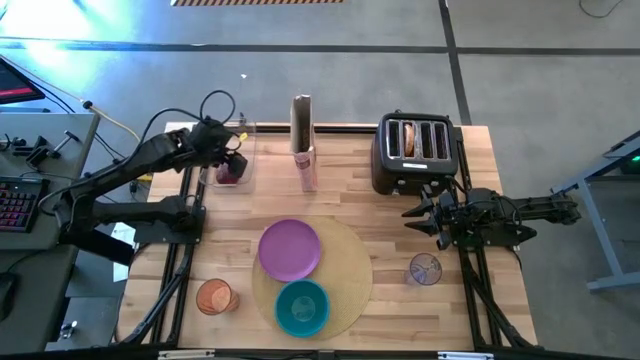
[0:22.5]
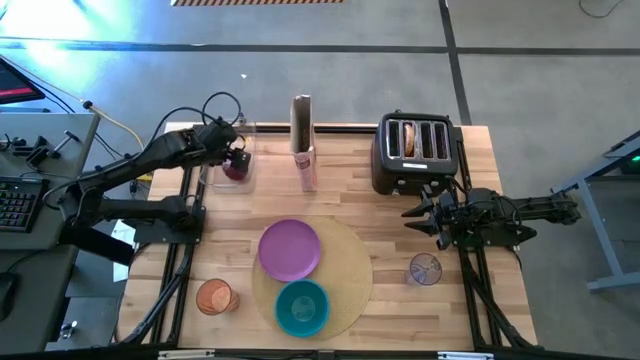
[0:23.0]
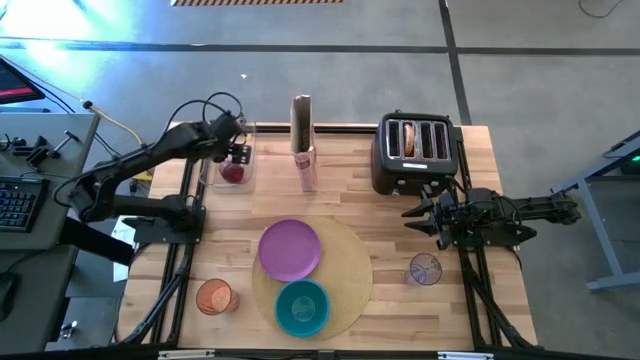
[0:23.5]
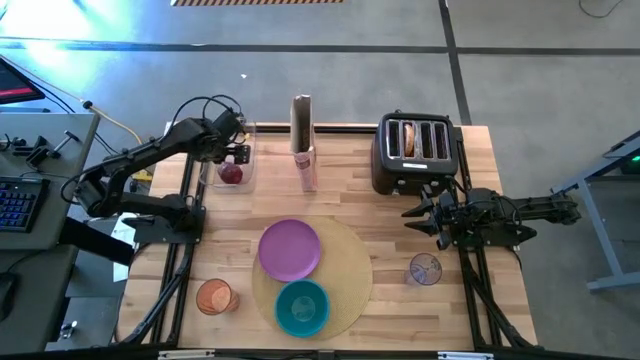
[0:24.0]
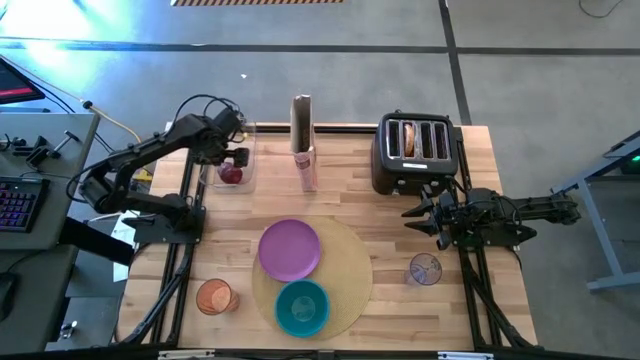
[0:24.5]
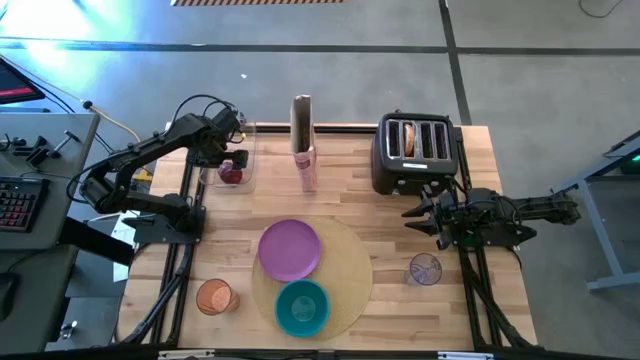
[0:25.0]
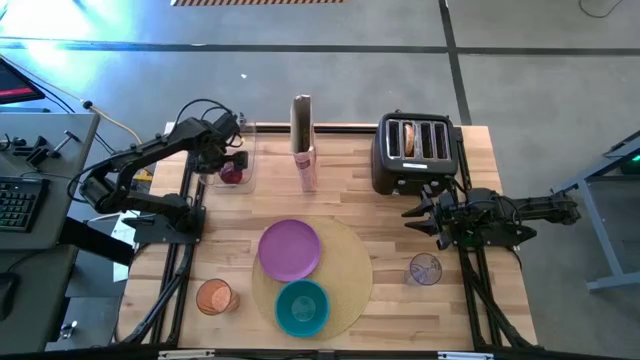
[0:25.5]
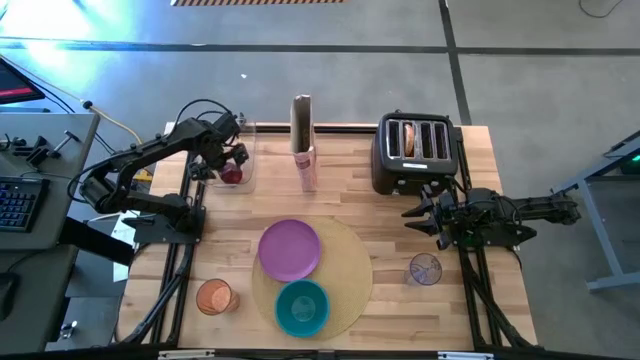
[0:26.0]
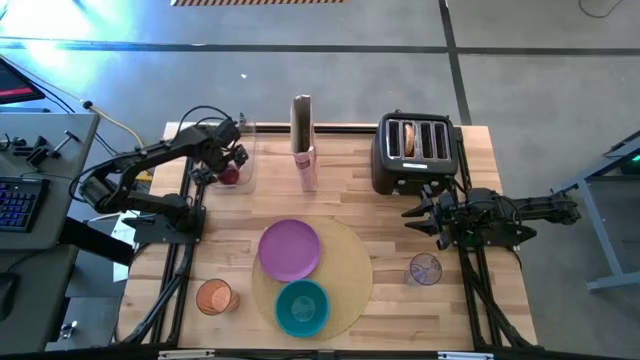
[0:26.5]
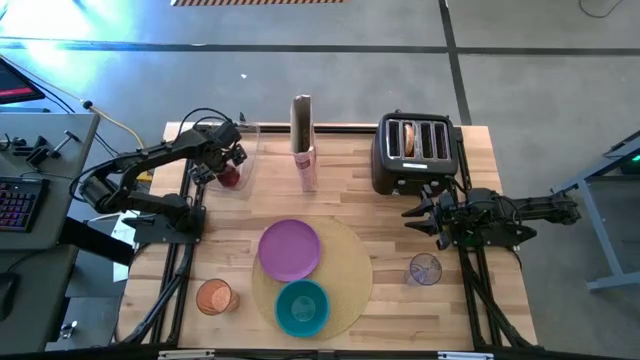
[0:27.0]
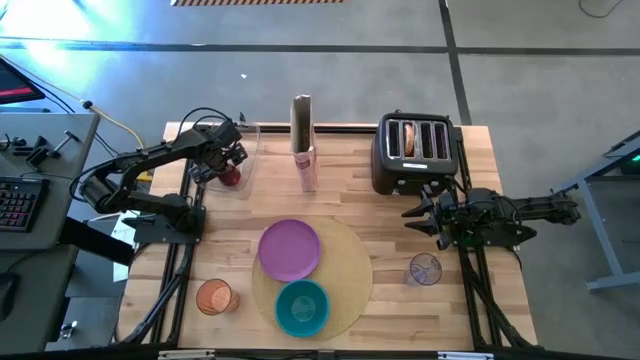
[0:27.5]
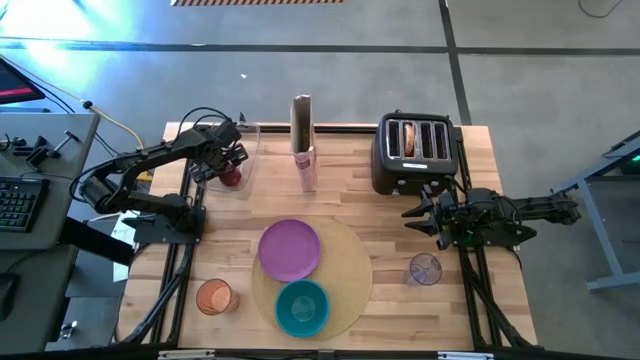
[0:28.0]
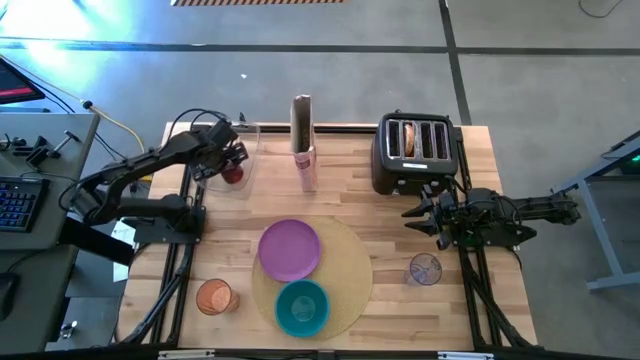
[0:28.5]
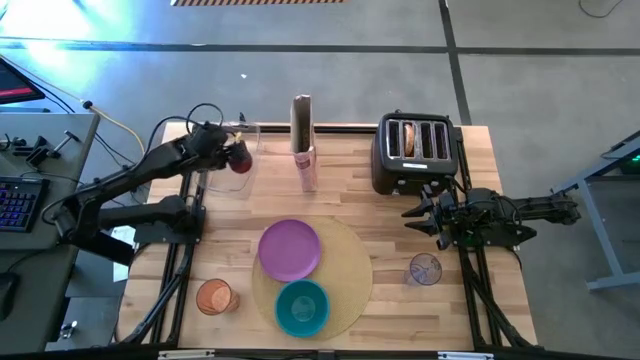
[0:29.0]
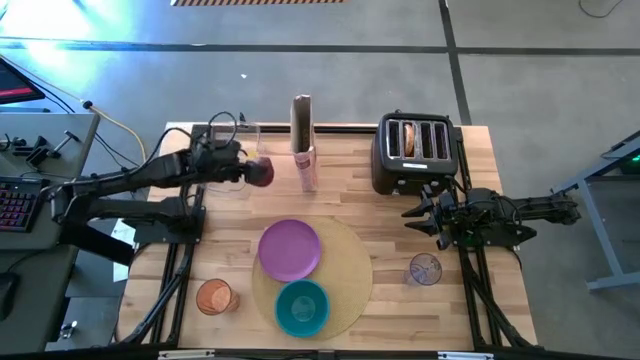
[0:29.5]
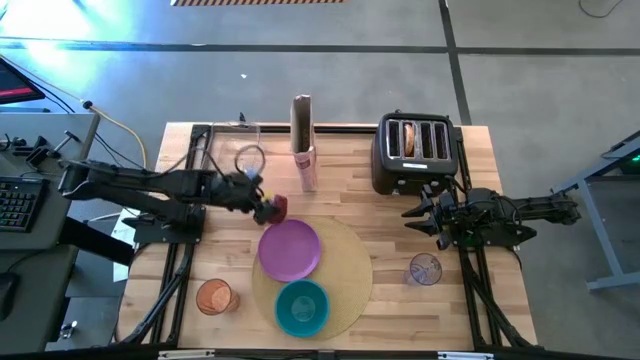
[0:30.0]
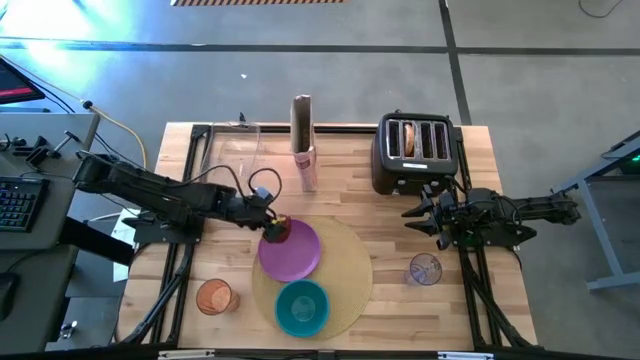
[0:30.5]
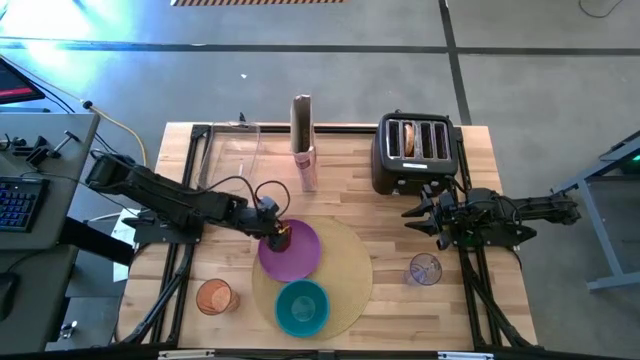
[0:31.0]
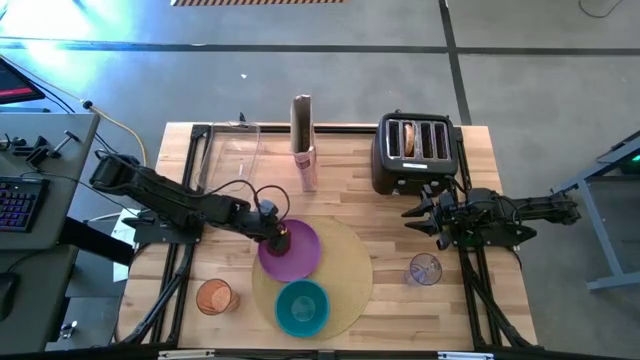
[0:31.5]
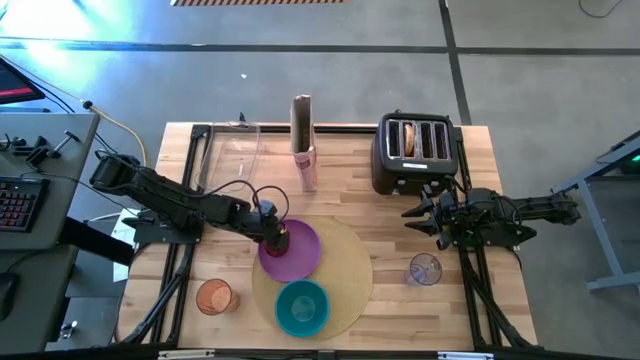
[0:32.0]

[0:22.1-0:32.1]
Task: Arrange a breakfast setting
Put the red apple on the purple plate

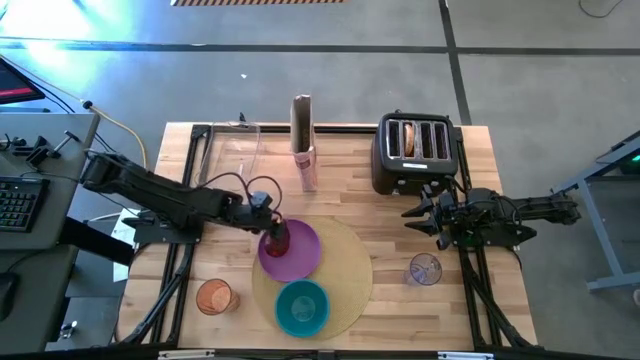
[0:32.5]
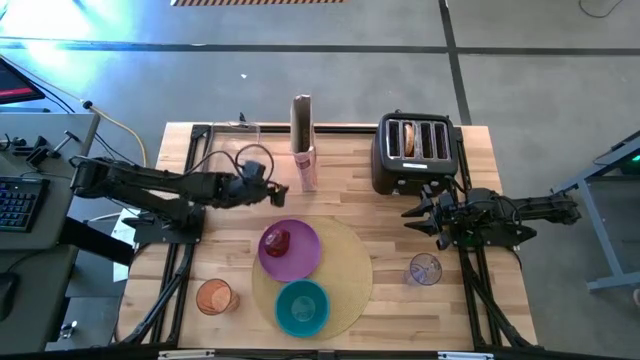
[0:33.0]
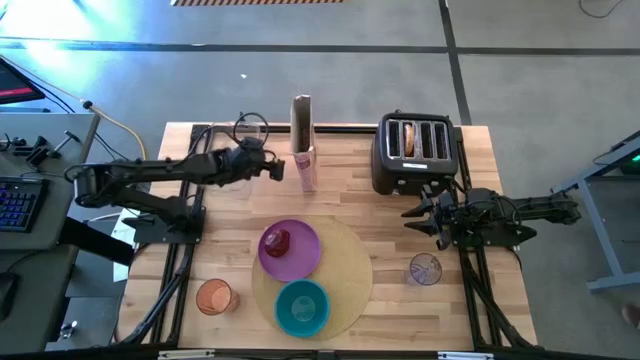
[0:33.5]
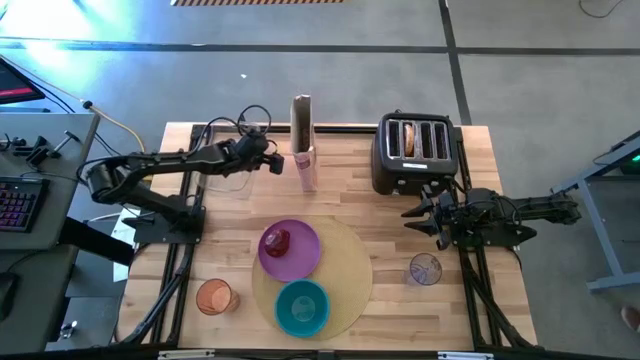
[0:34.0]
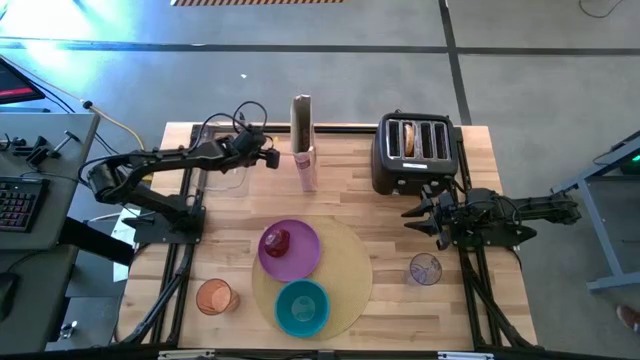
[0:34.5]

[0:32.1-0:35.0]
Adjust the transparent bin on the table

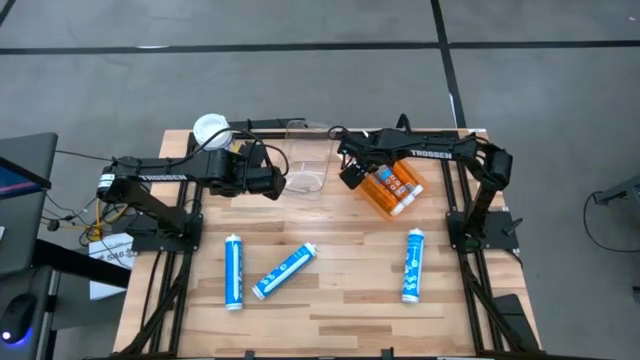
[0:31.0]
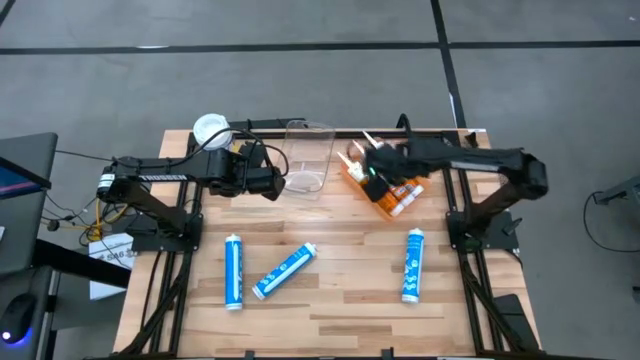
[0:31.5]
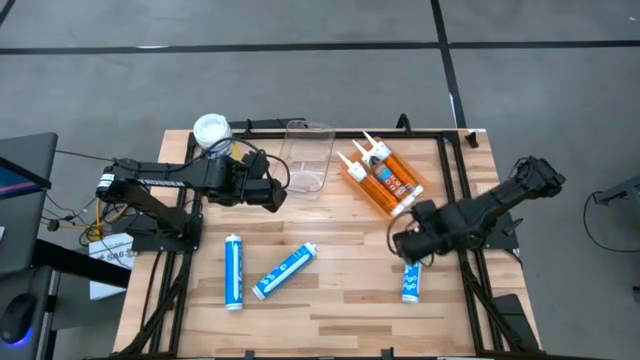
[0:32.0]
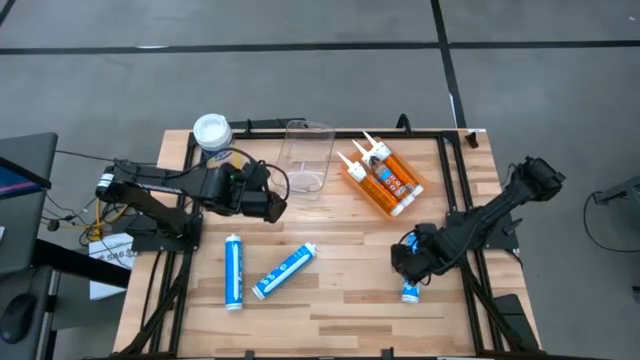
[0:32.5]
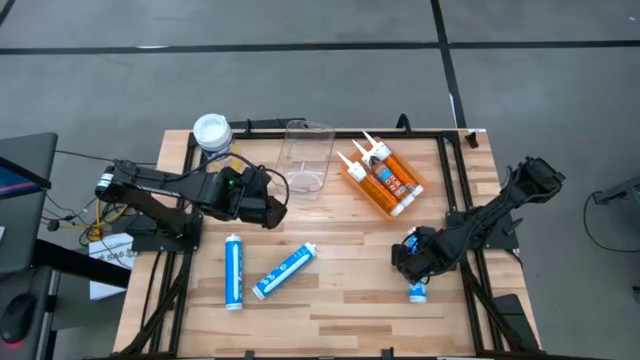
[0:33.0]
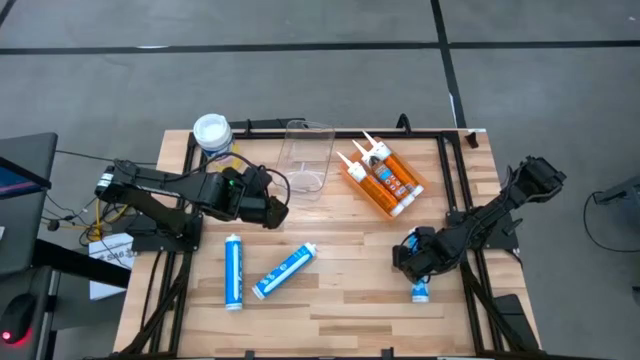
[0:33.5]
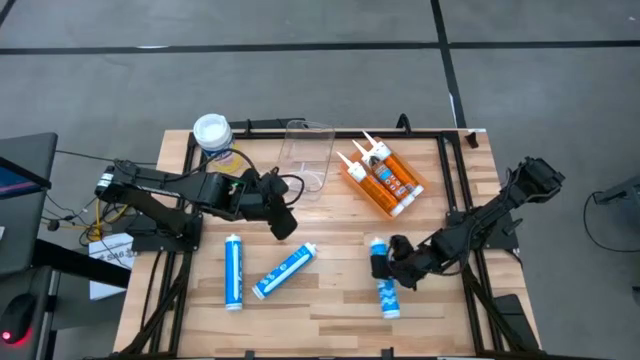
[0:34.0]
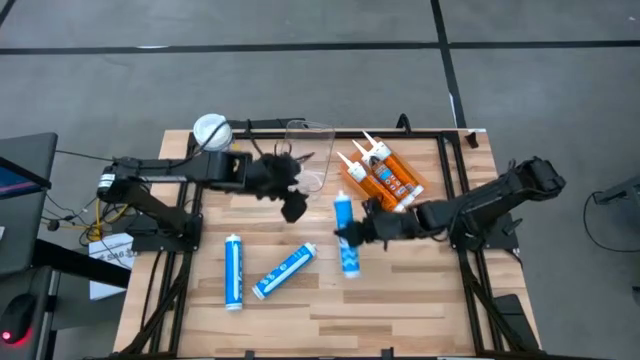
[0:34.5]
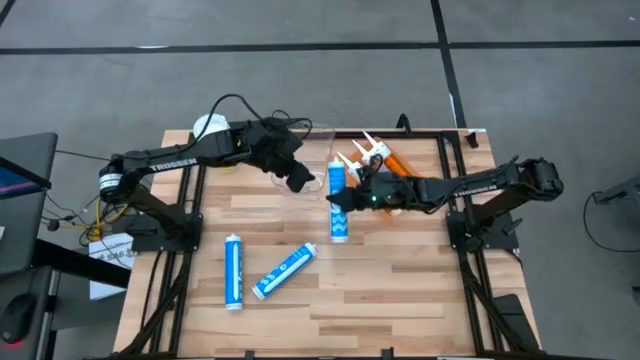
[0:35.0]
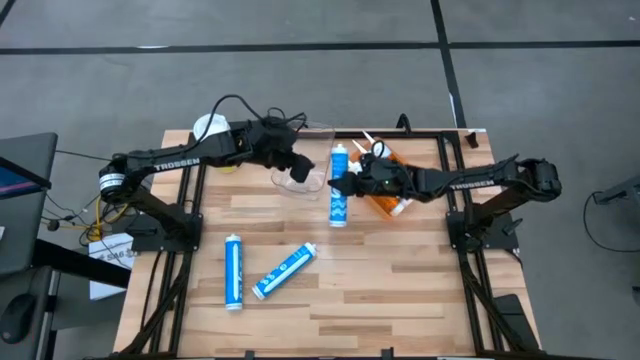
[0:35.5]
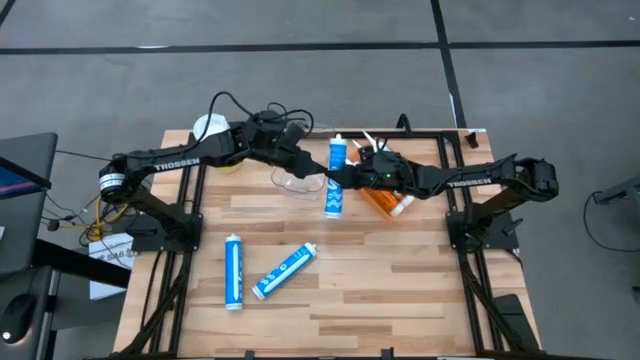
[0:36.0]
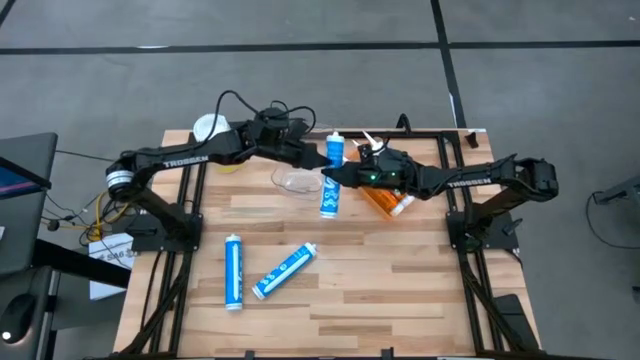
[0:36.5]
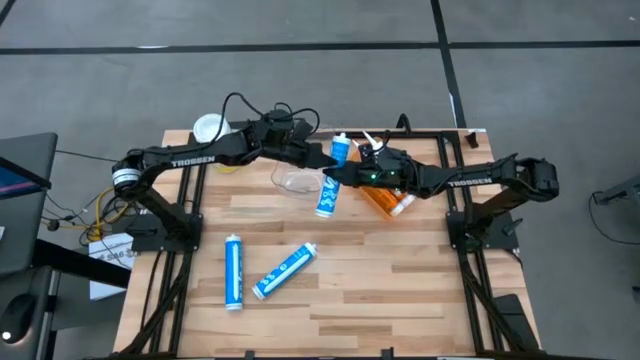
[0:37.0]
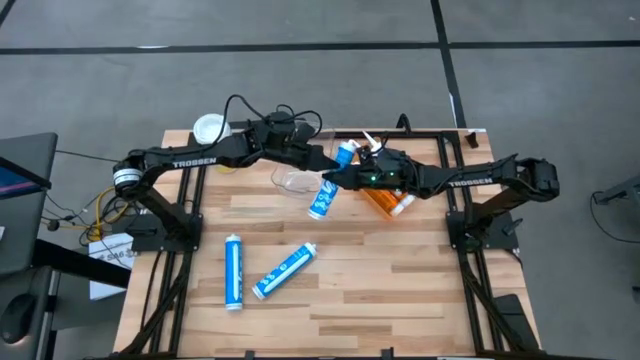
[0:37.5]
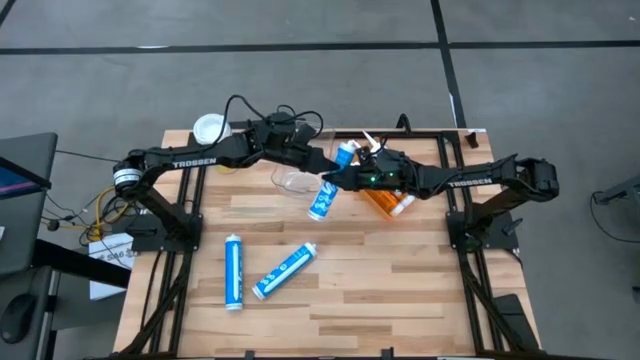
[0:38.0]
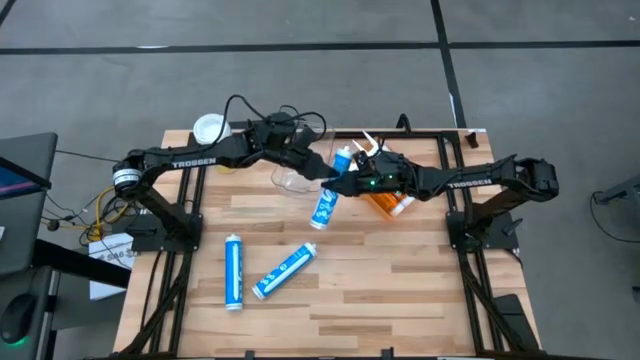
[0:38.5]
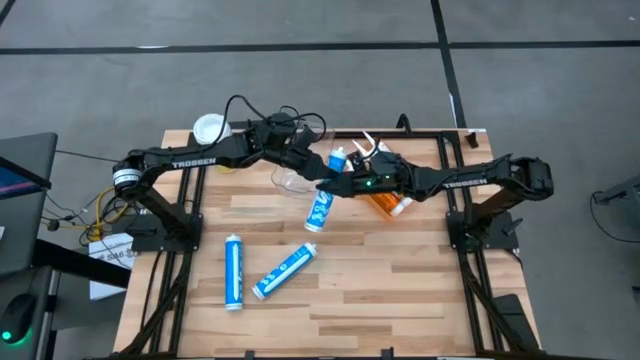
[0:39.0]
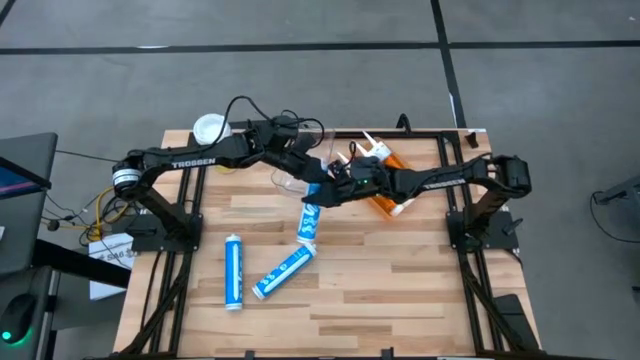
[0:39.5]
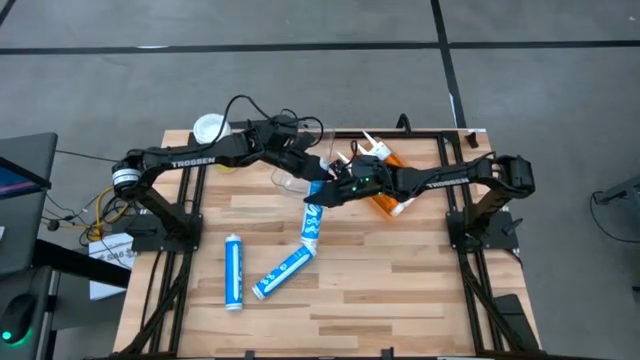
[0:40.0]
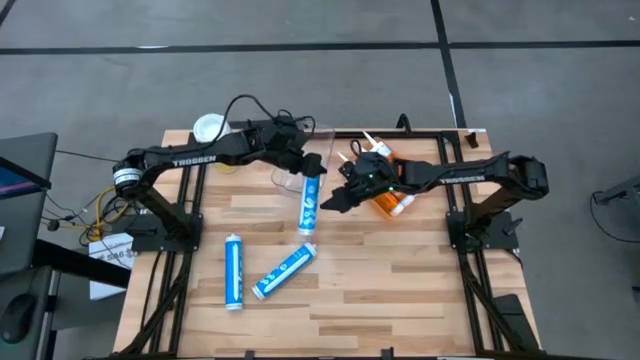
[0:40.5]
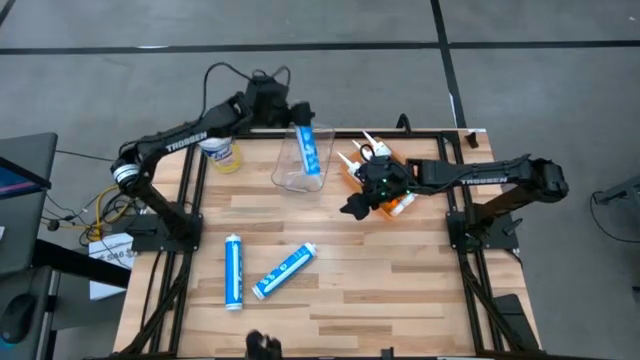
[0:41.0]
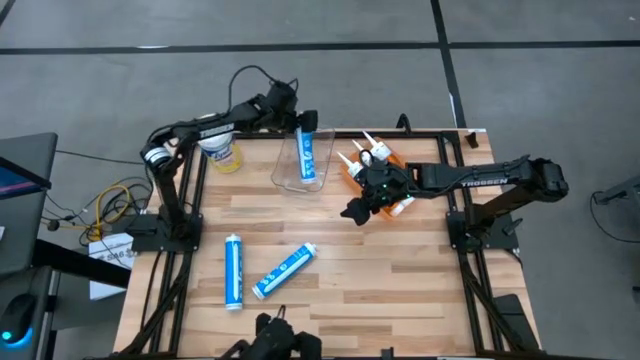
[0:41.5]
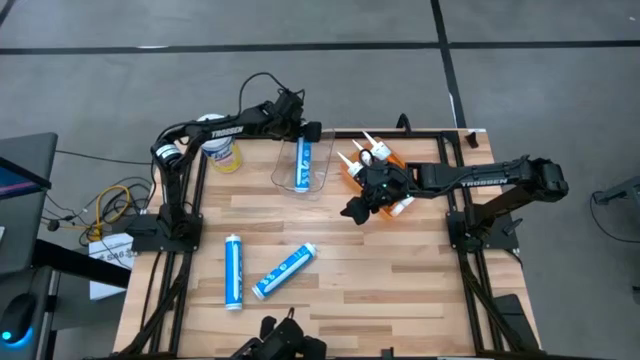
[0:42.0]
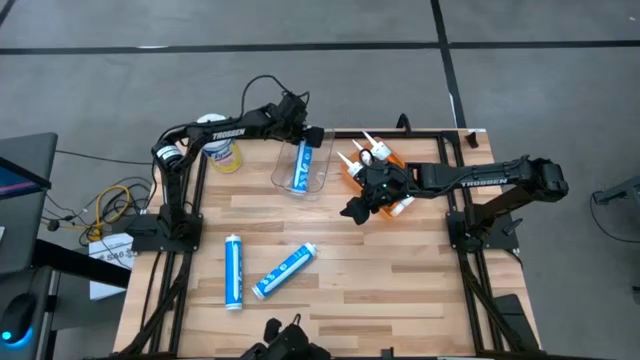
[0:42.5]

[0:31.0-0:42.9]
Task: Pick & place silicon tubes, Sealant and Lysol wipes
Put the right blue sealant into the left transparent bin
